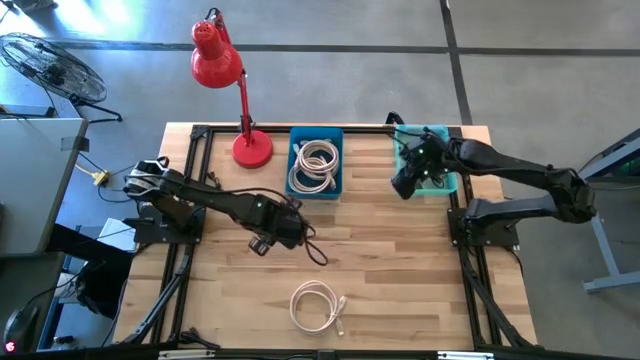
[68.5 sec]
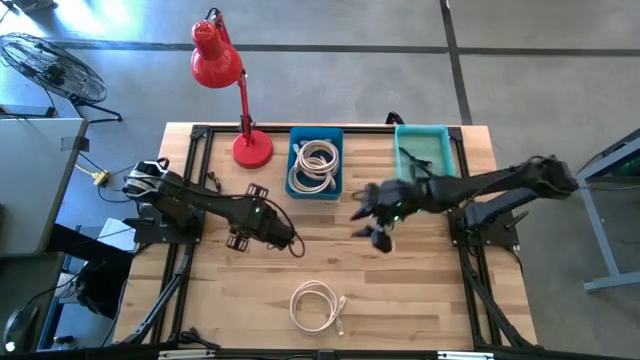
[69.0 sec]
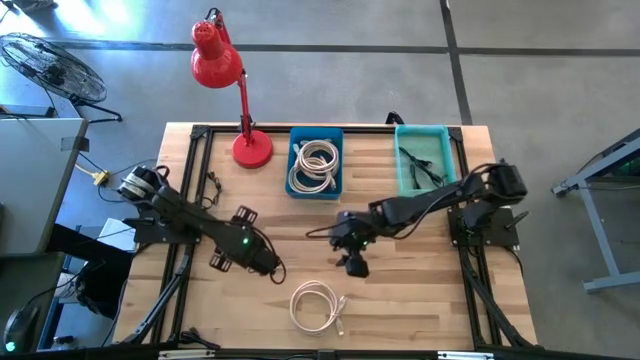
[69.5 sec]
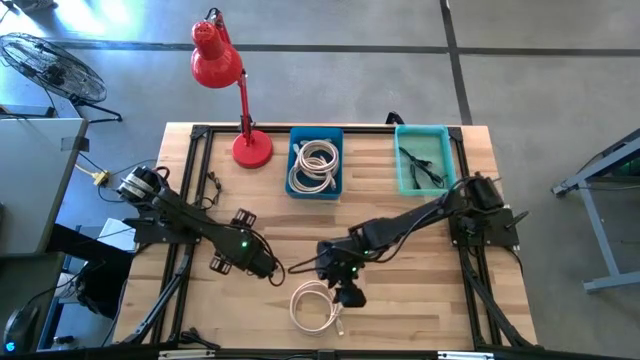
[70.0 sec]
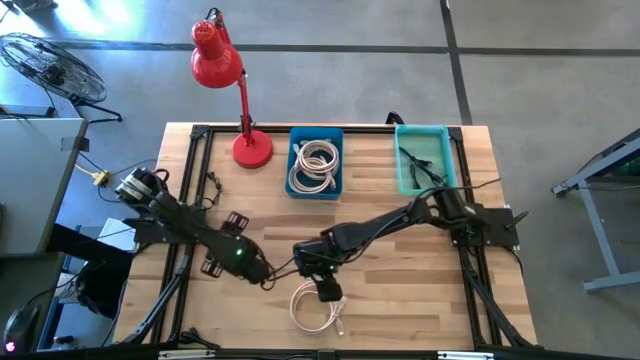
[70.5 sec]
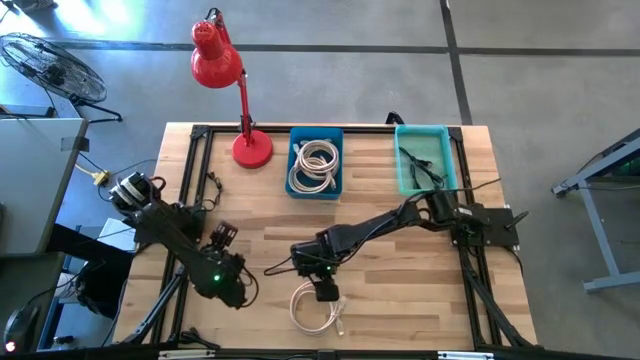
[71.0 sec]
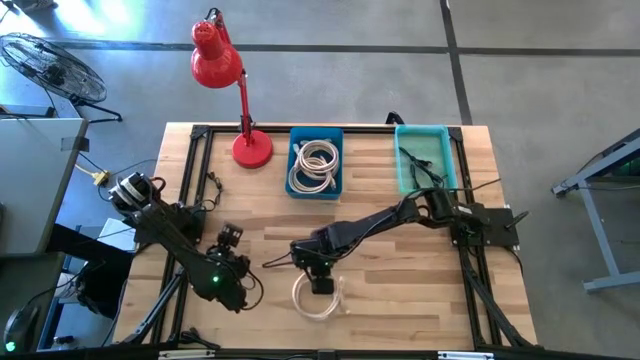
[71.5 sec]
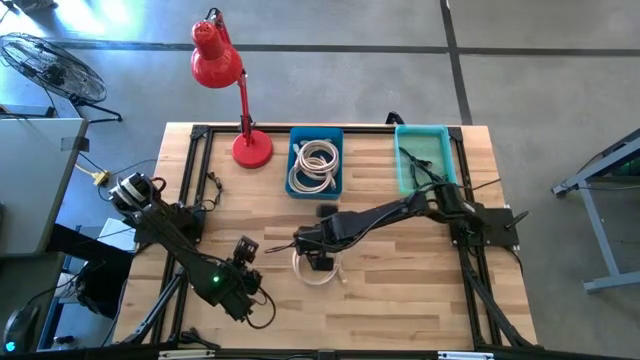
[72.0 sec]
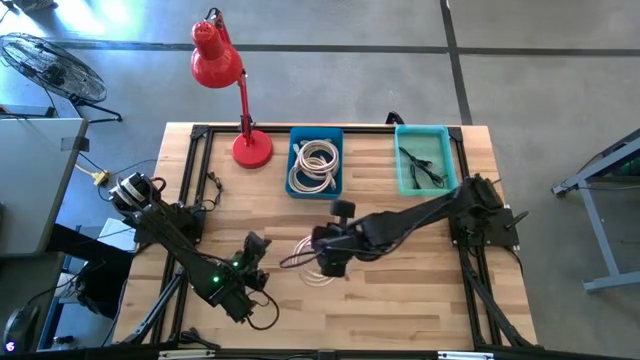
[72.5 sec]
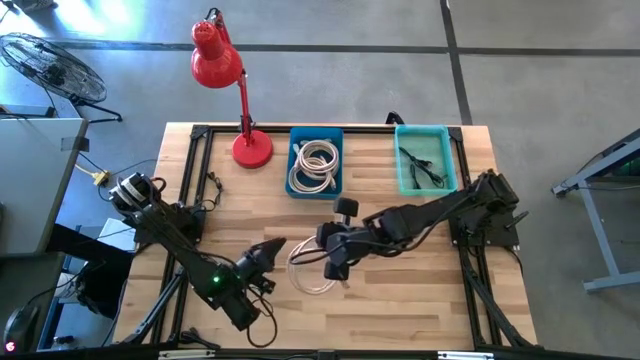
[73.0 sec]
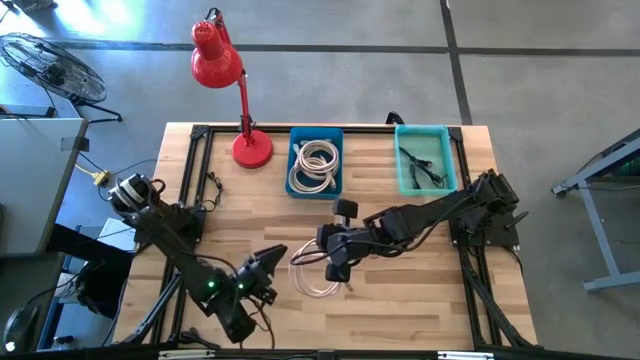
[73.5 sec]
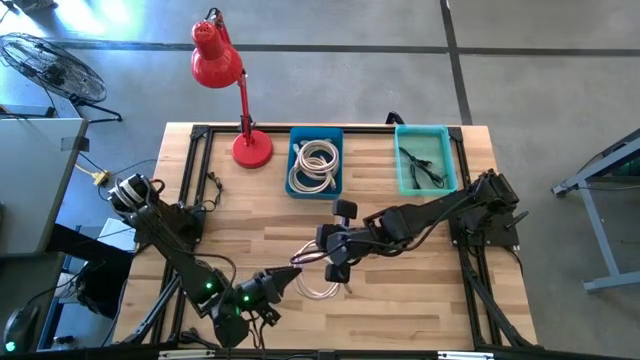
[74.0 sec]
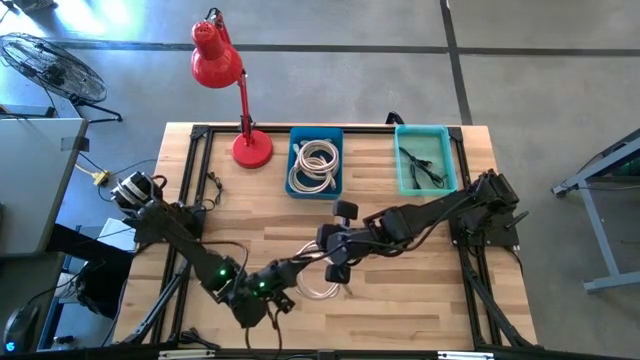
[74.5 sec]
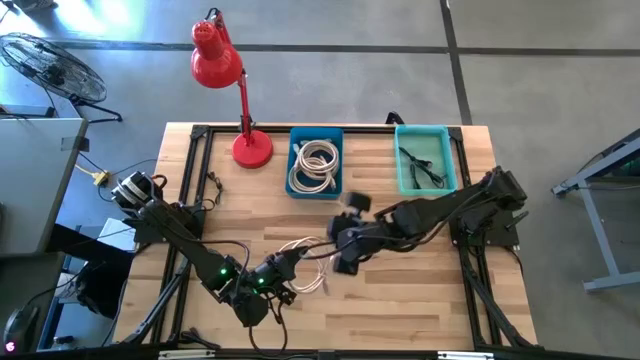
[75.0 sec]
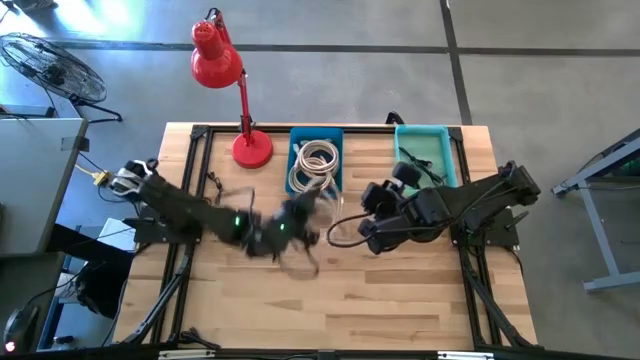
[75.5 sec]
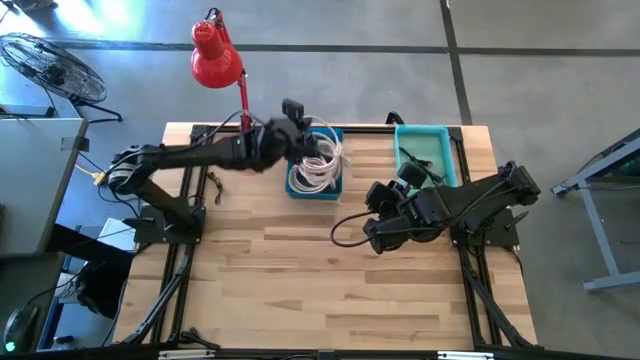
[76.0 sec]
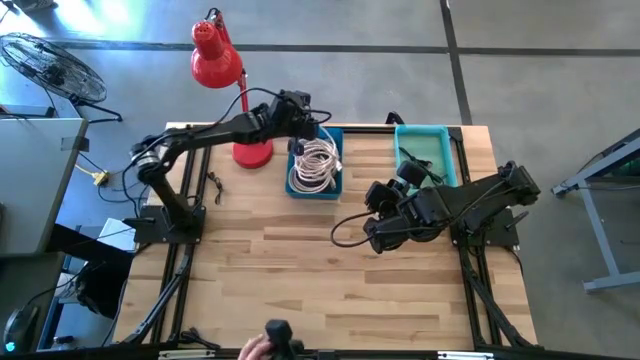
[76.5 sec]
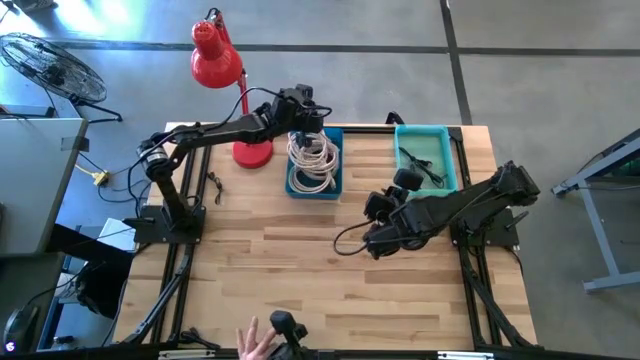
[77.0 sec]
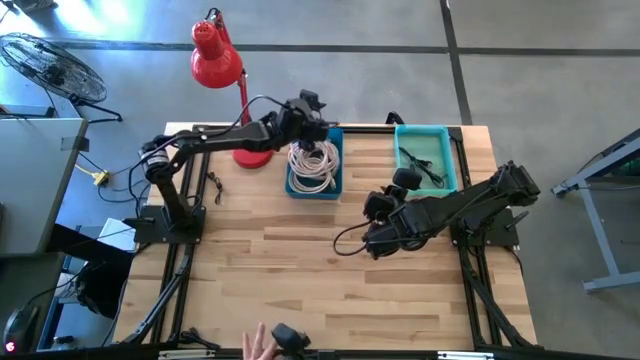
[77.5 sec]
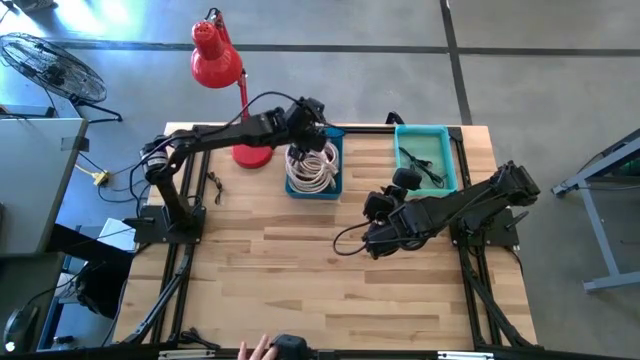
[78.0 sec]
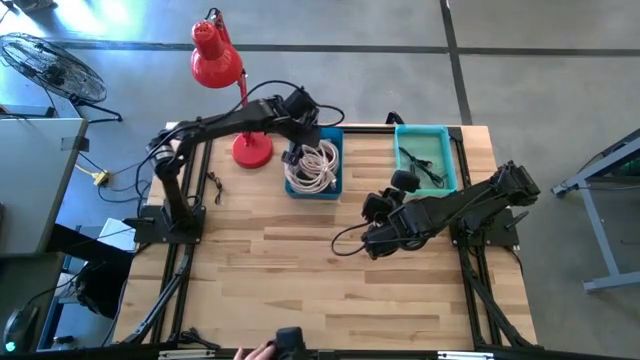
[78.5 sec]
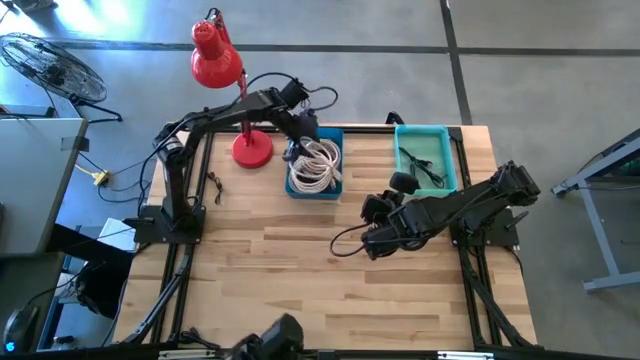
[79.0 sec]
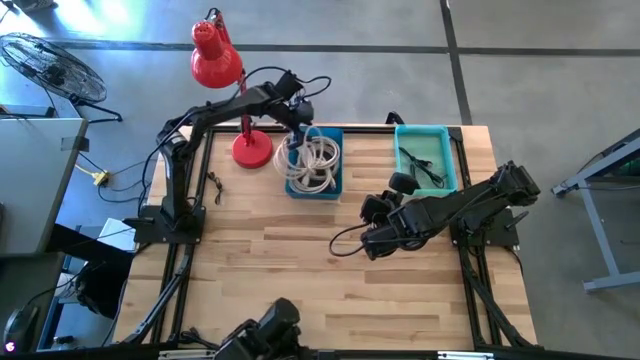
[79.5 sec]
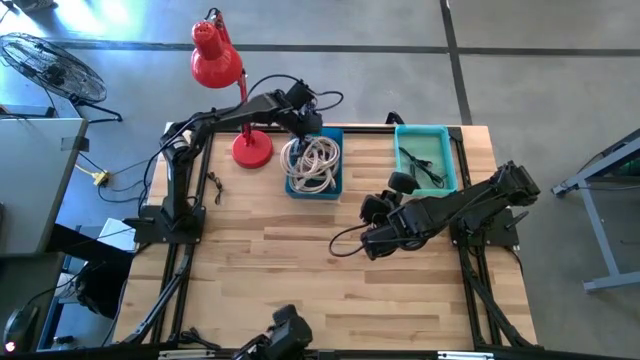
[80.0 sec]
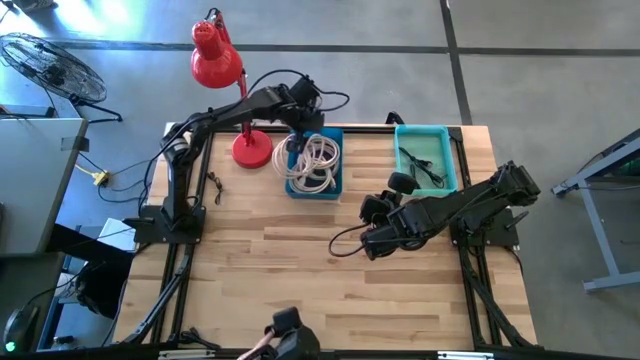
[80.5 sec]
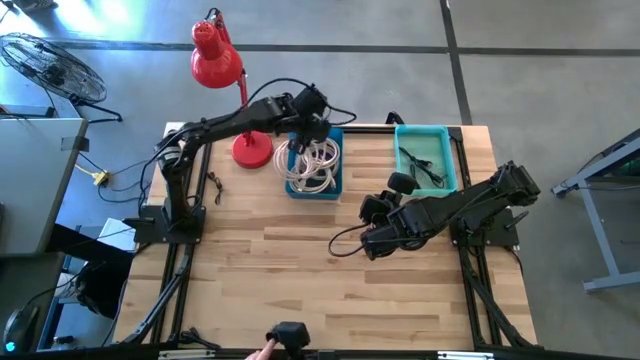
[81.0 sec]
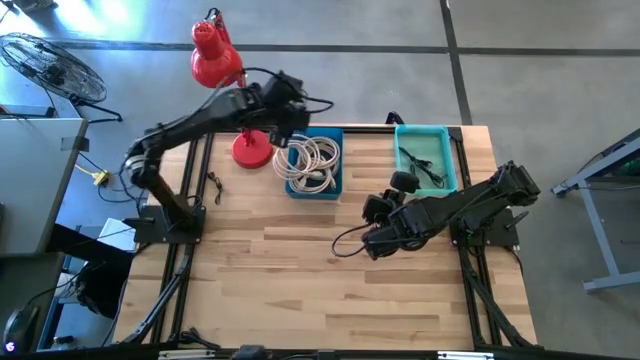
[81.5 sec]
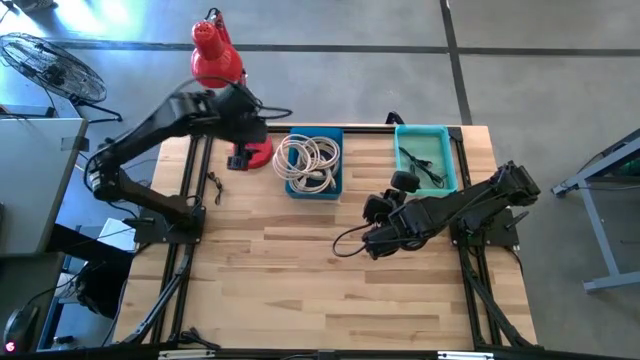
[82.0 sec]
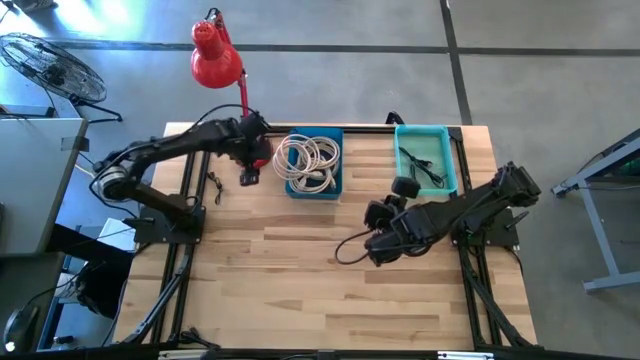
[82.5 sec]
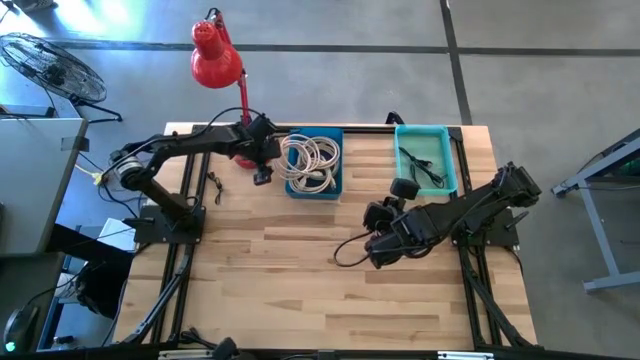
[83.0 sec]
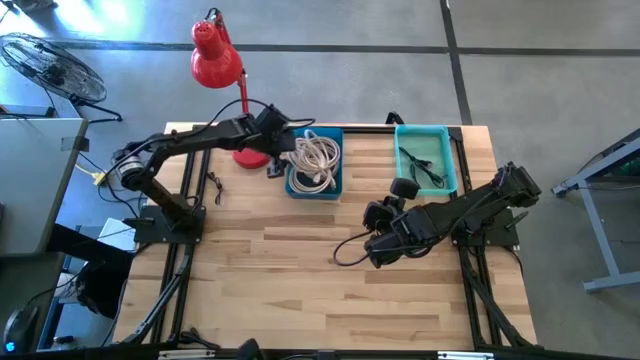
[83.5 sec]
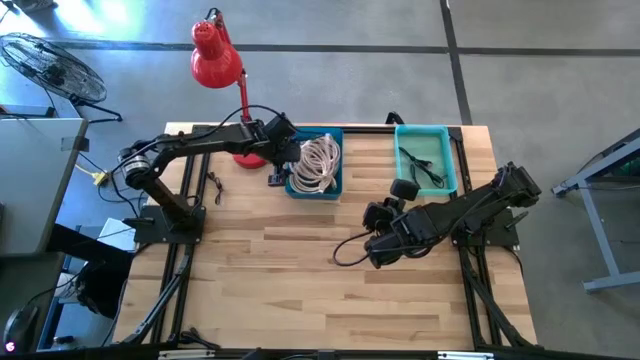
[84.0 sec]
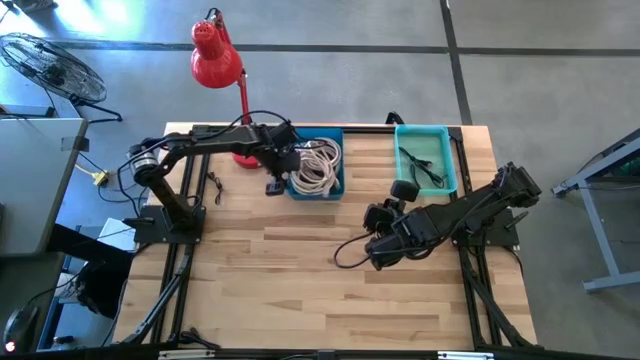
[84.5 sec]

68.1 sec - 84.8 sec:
Task: Pick & Place USB Port
Put the brown cable in the blue bin

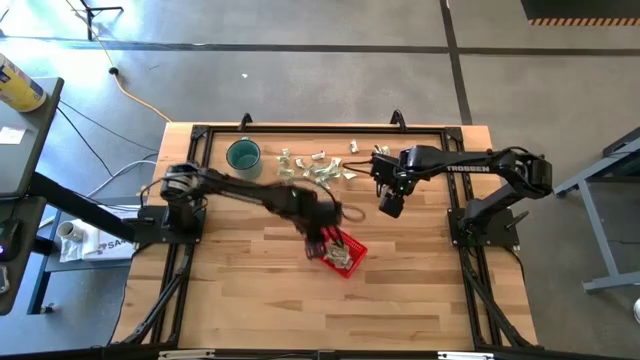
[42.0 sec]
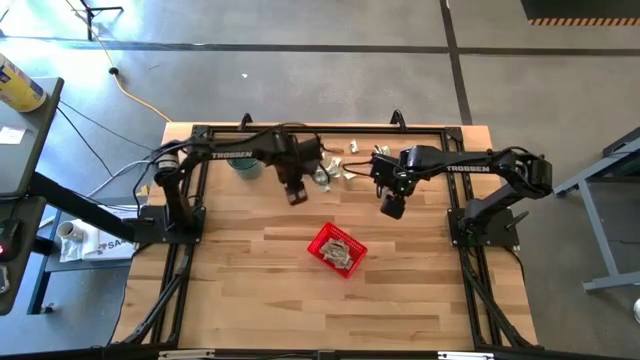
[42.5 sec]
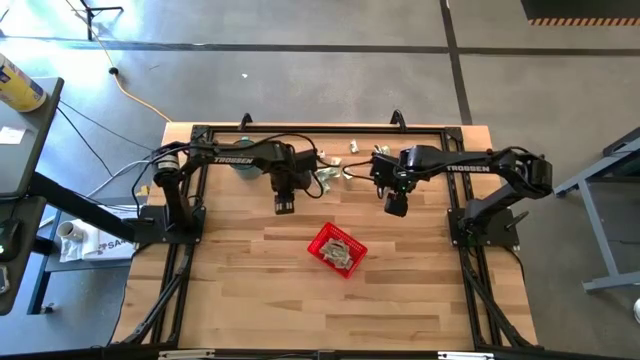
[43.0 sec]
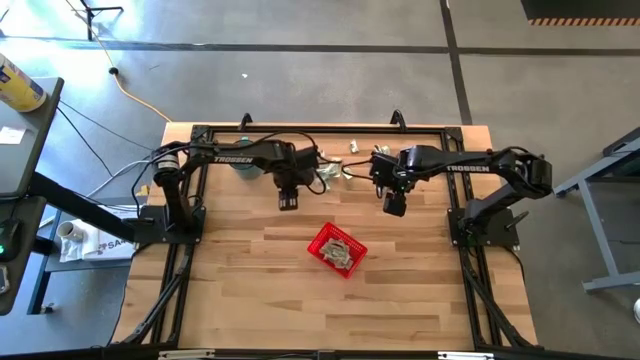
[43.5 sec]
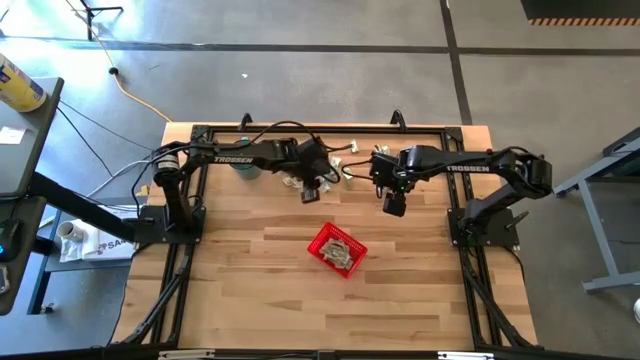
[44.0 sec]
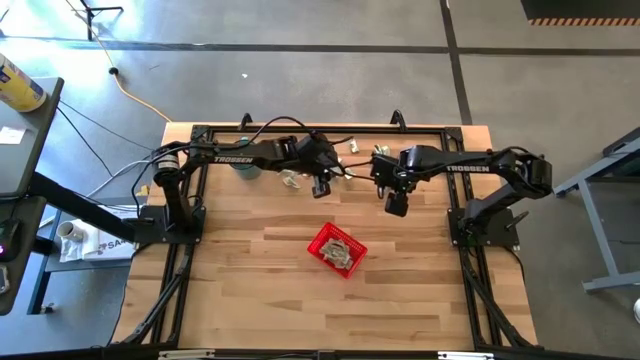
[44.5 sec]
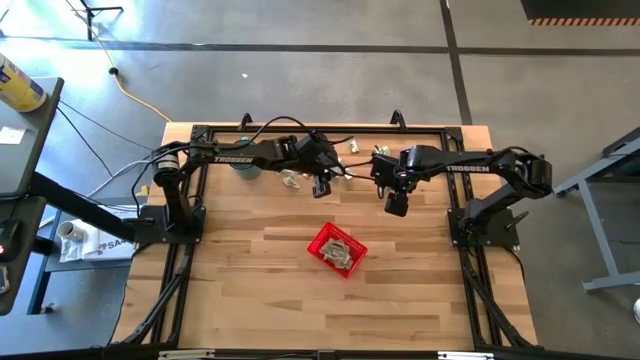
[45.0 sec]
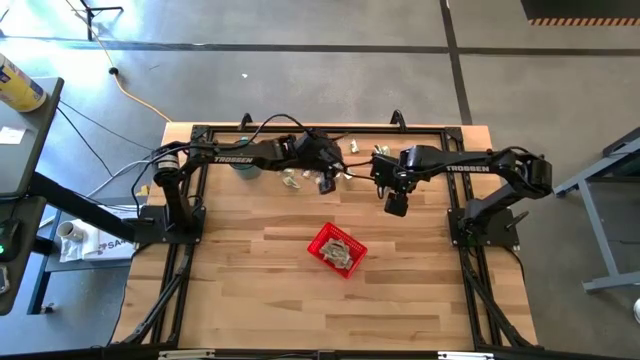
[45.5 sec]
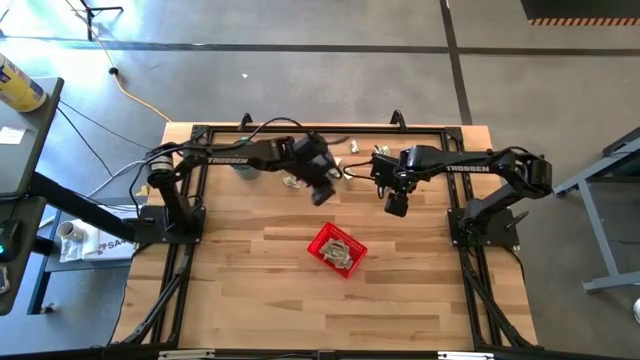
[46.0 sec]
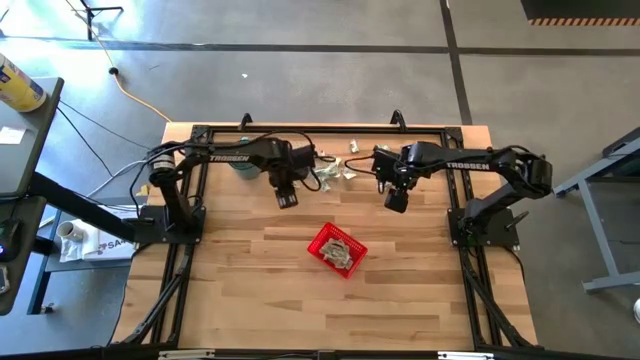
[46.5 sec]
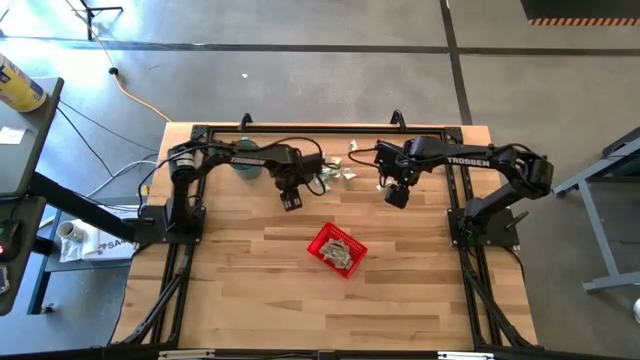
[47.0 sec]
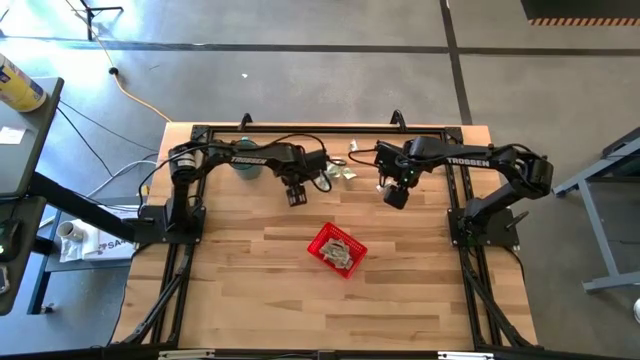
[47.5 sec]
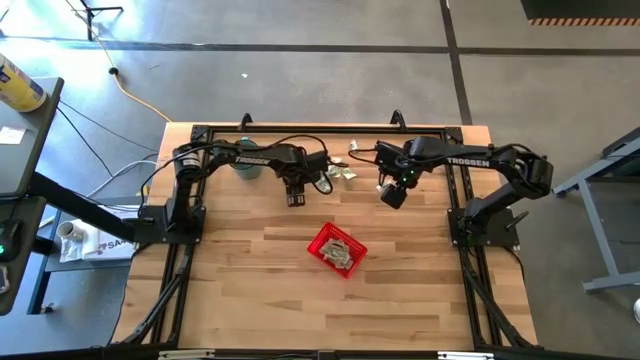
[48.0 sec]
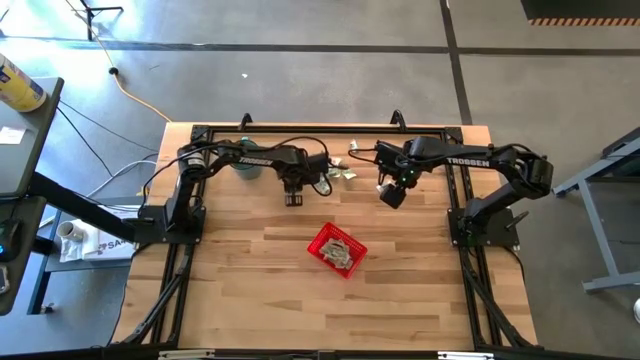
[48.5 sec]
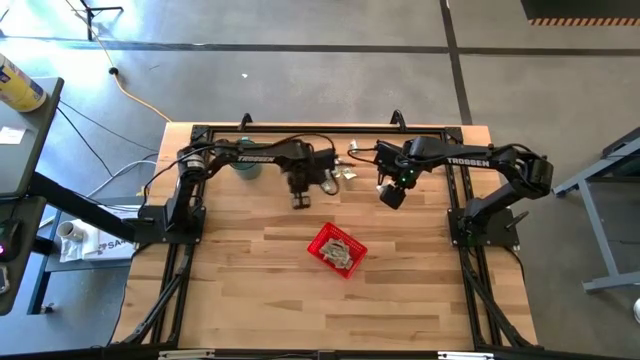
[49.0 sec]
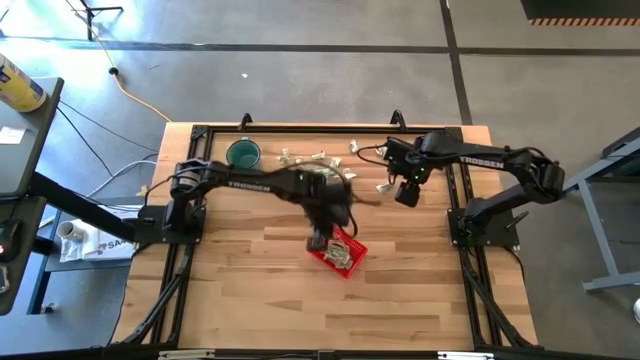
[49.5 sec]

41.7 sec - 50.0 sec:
Task: Pick and place Stevia / Truvia into bins
Put the light green stevia packet into the bin
